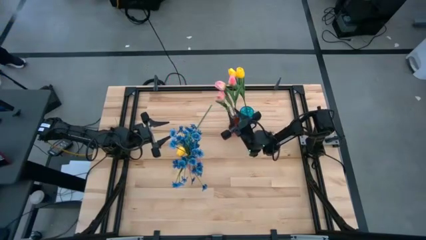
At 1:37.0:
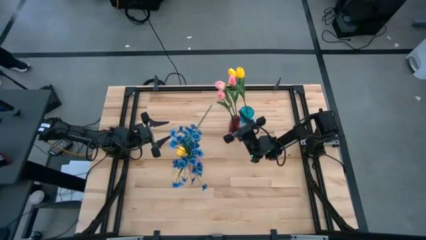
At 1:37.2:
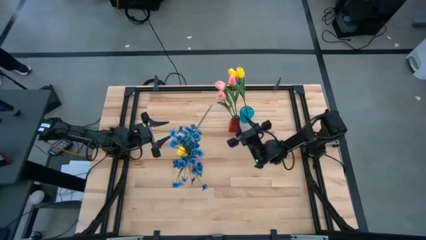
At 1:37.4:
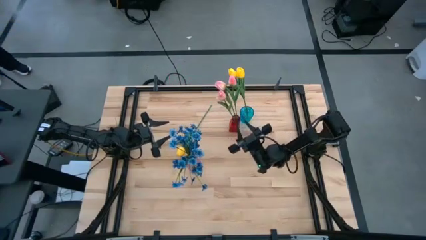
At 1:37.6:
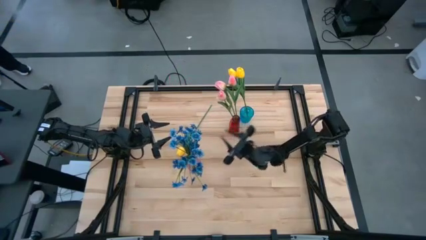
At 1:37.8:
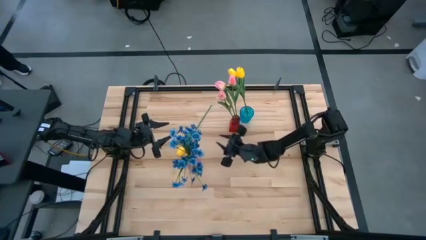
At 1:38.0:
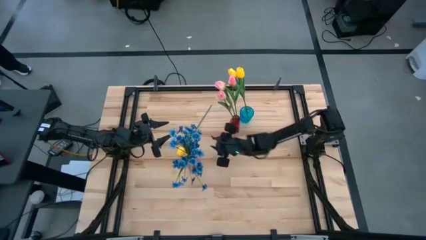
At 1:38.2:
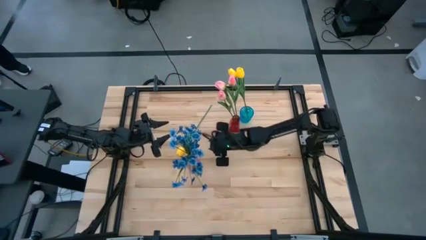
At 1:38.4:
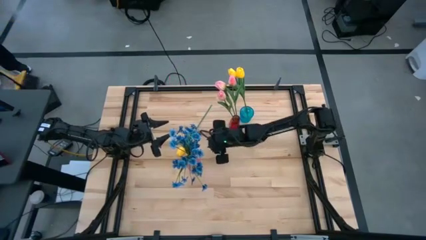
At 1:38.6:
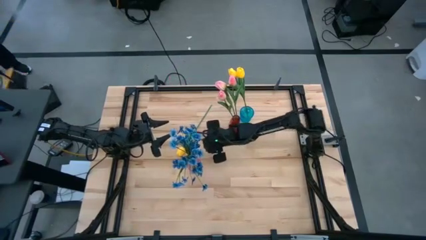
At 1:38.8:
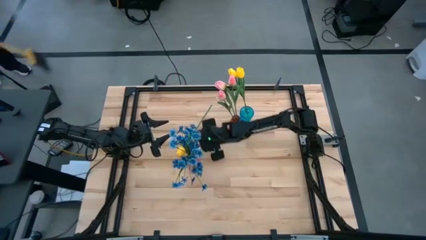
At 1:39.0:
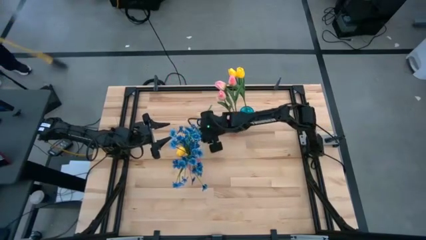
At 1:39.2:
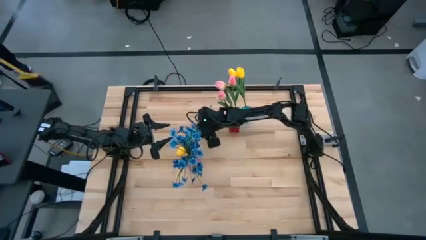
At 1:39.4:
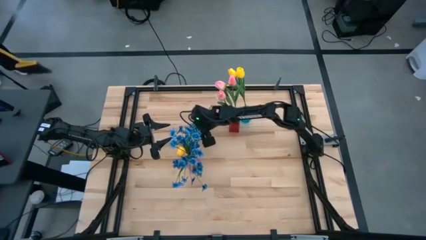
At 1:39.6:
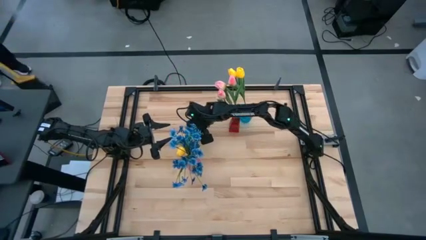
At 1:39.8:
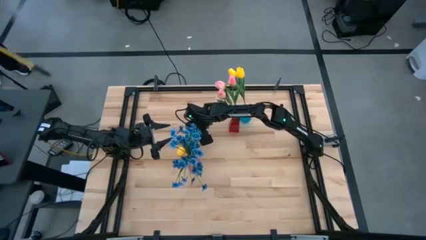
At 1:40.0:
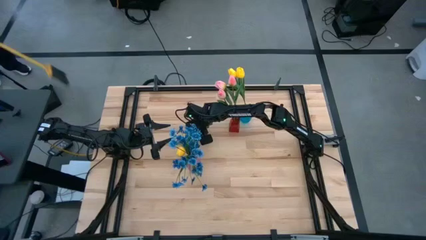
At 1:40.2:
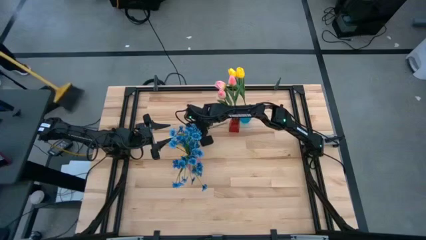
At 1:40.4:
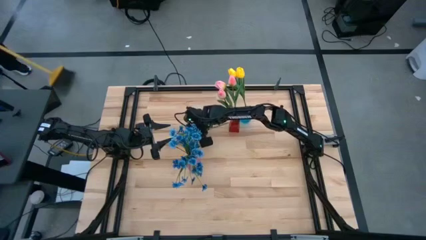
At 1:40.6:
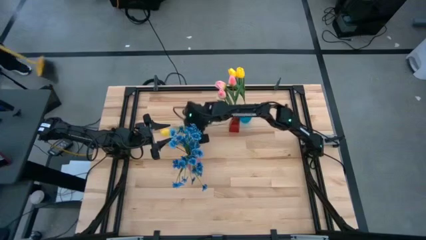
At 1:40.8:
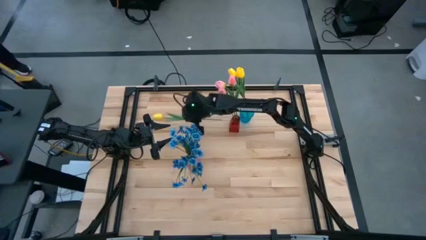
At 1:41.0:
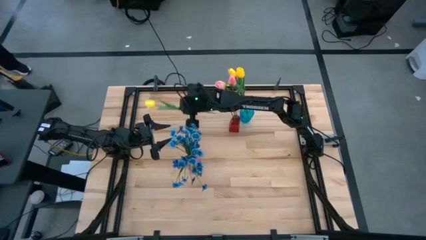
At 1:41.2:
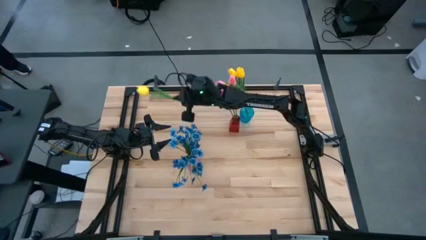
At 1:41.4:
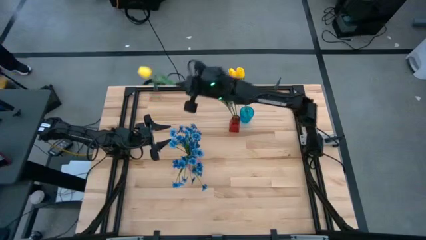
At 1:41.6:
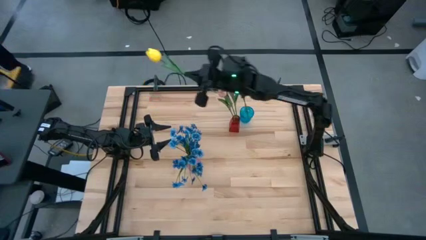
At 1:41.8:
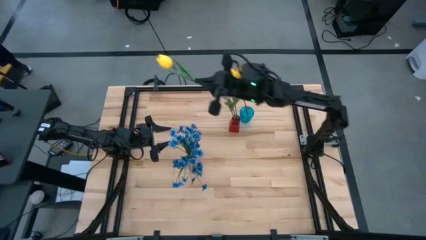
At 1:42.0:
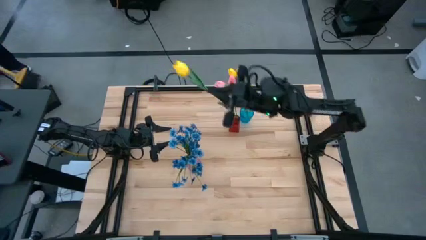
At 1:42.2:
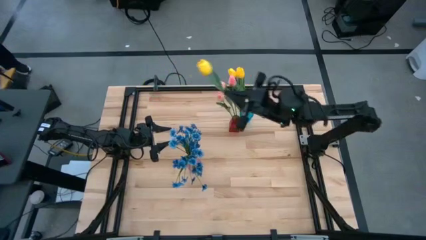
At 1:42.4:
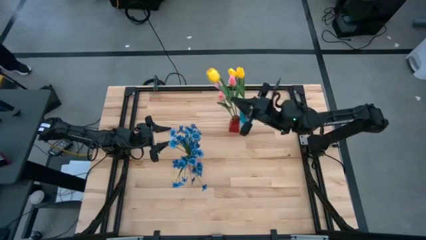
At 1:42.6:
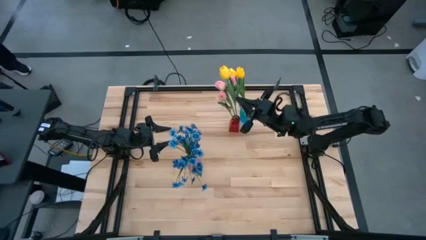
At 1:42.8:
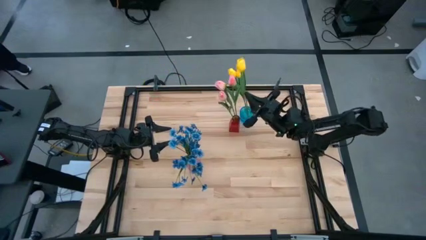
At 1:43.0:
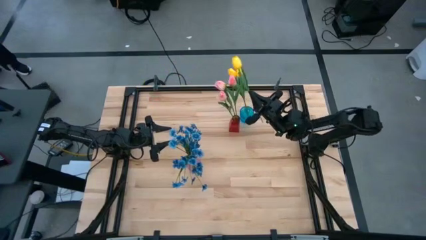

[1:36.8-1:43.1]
Task: Sort flowers into vase by color
Put the yellow flower into the blue vase

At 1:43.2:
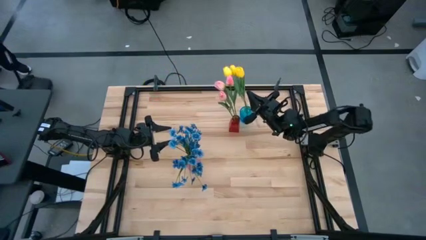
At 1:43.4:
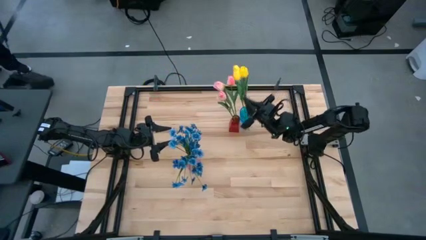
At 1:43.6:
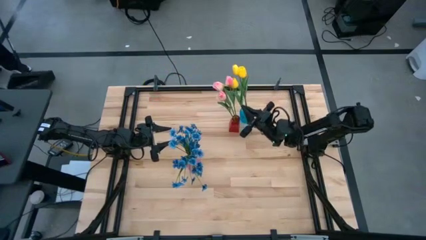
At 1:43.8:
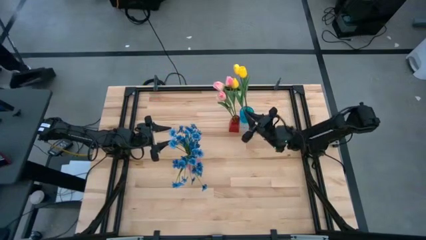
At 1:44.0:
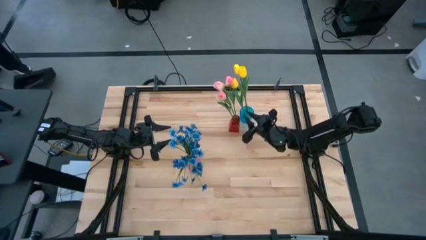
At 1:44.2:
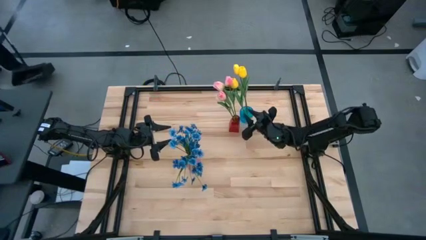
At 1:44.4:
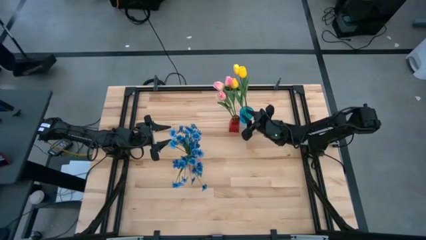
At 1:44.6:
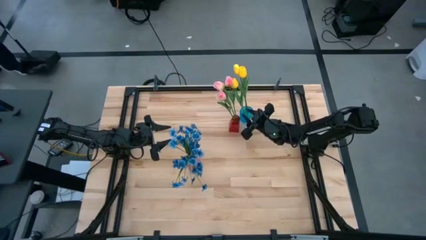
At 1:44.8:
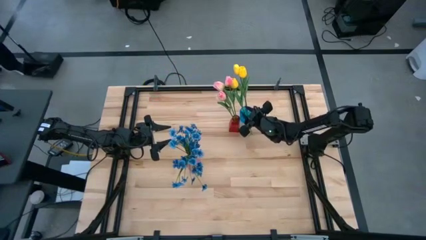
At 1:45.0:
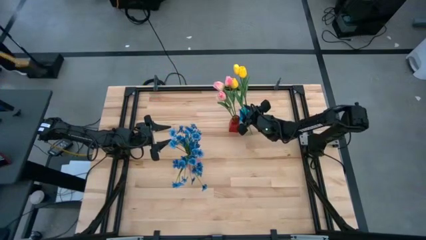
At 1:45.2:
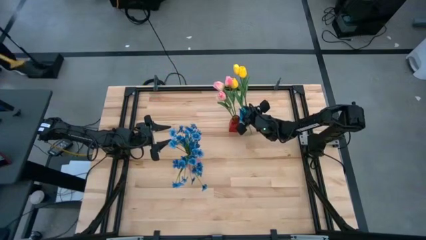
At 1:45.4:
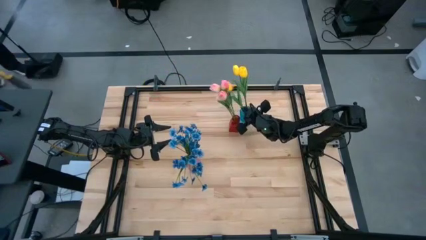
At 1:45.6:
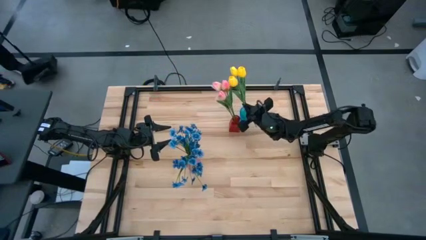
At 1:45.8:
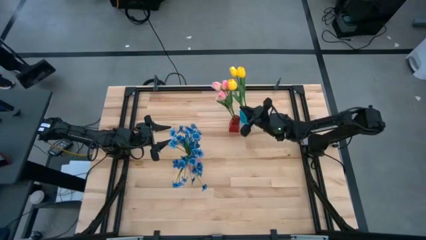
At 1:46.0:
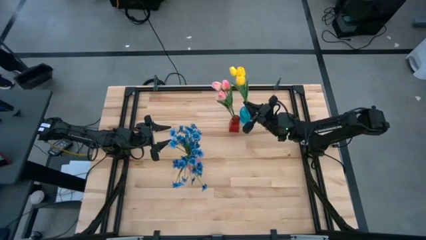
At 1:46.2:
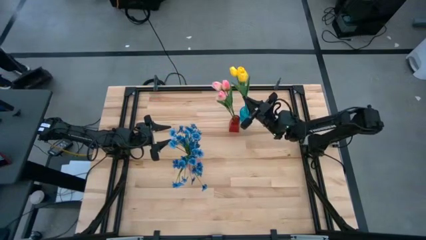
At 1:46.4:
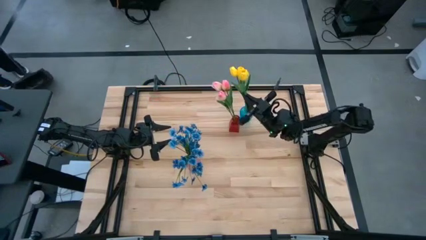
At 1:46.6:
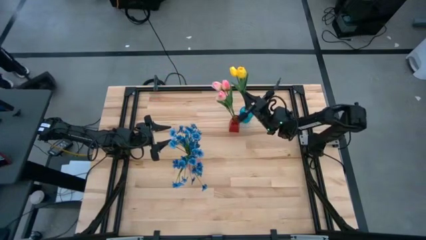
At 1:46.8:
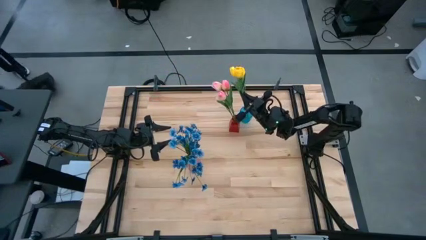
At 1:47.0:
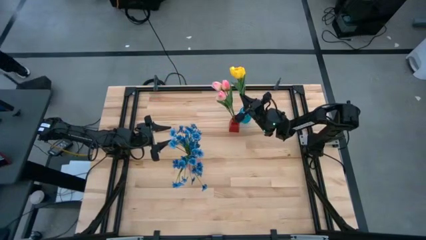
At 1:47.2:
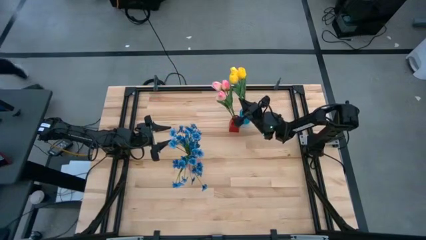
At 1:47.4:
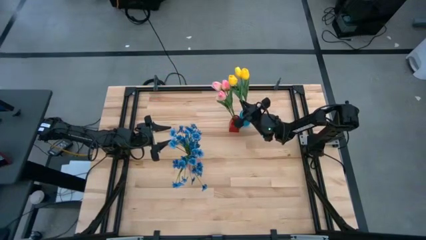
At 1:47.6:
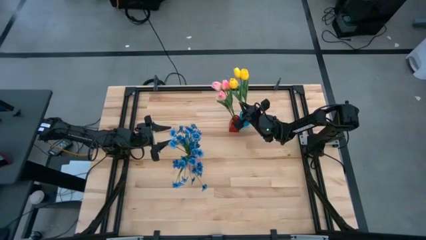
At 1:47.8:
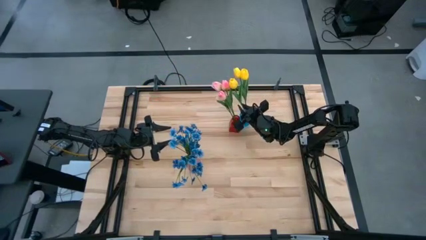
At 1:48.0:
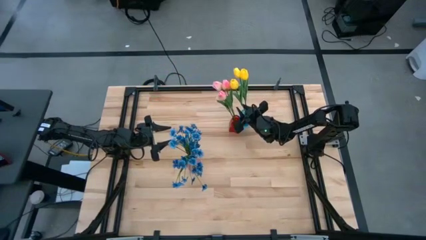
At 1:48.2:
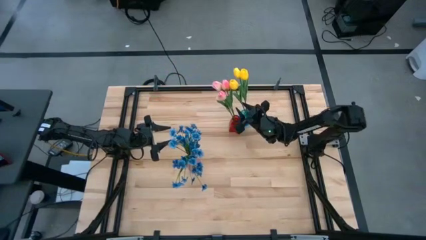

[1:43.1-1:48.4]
Put the yellow flower into the blue vase

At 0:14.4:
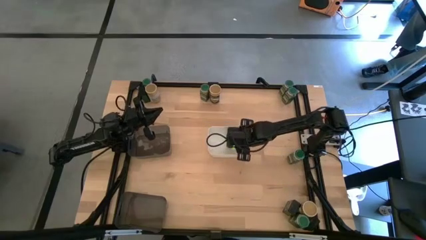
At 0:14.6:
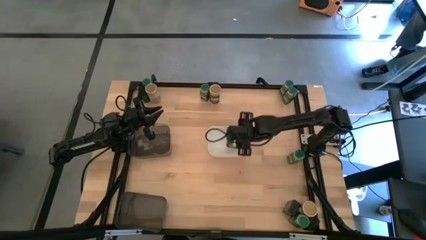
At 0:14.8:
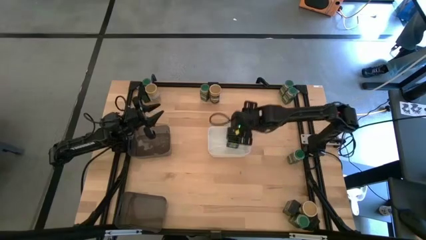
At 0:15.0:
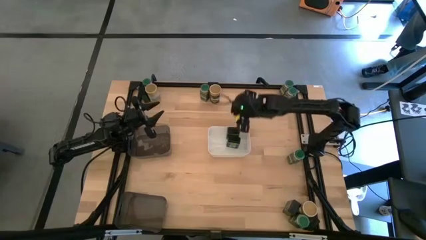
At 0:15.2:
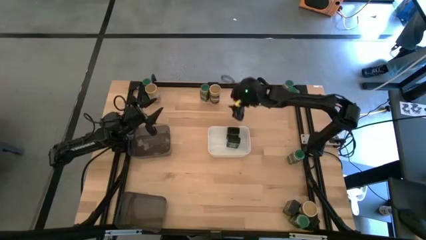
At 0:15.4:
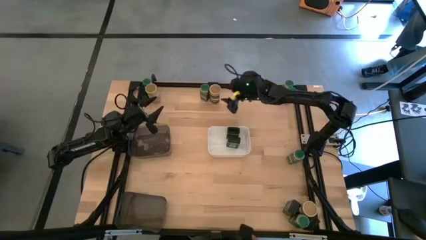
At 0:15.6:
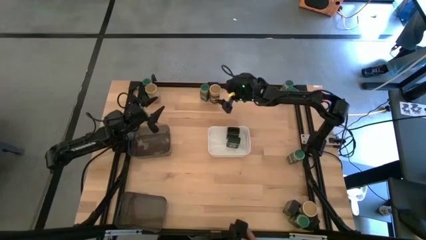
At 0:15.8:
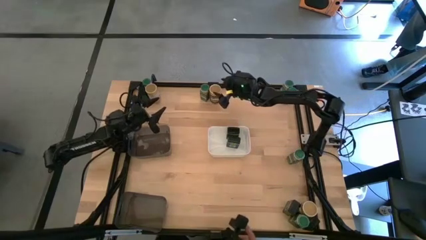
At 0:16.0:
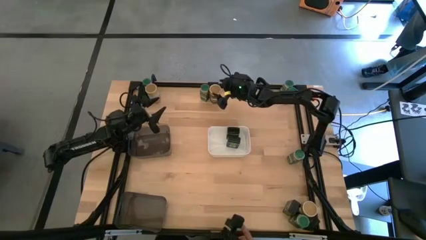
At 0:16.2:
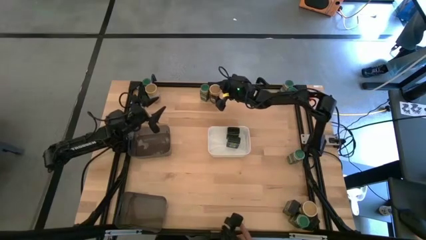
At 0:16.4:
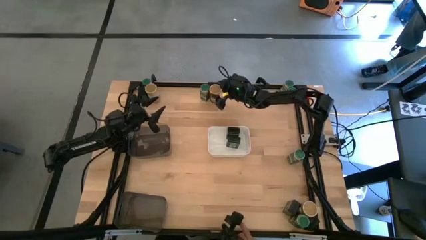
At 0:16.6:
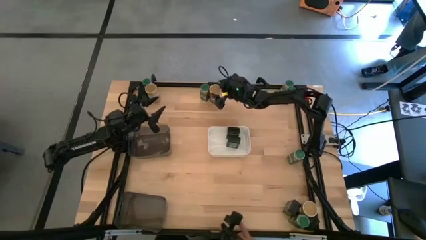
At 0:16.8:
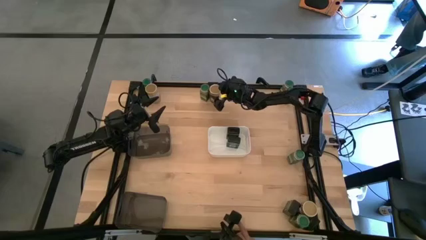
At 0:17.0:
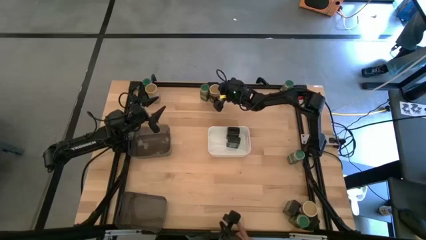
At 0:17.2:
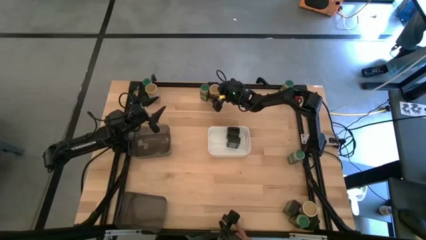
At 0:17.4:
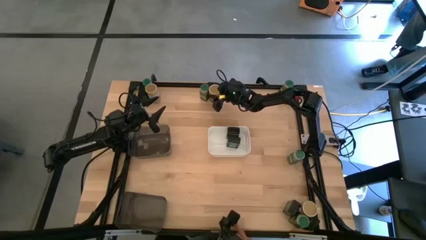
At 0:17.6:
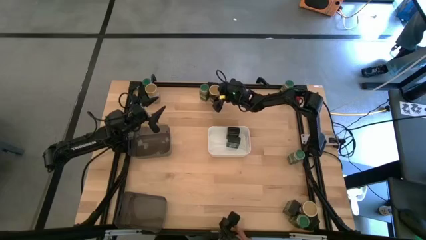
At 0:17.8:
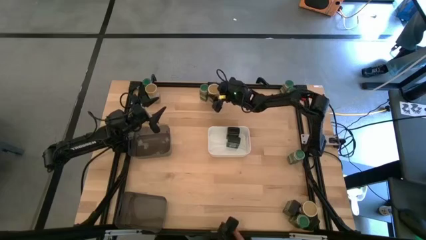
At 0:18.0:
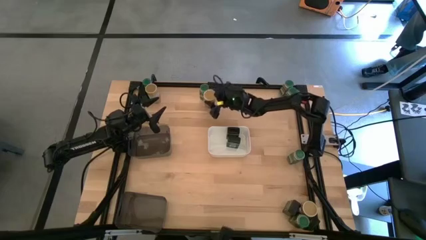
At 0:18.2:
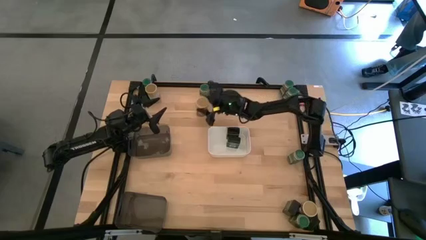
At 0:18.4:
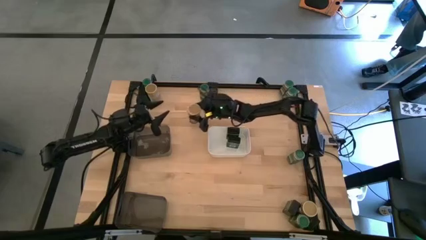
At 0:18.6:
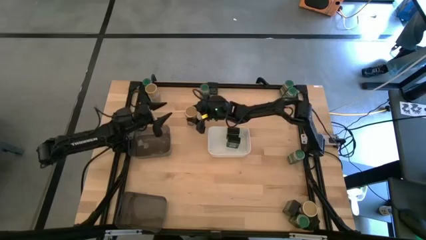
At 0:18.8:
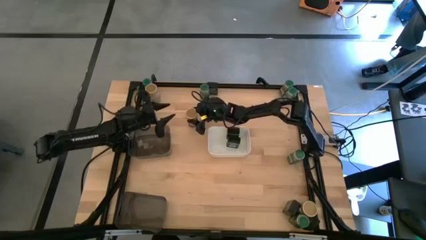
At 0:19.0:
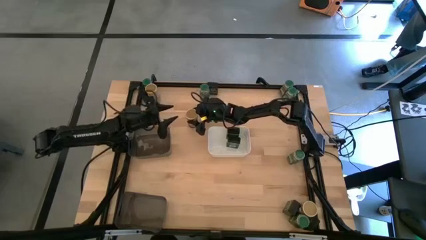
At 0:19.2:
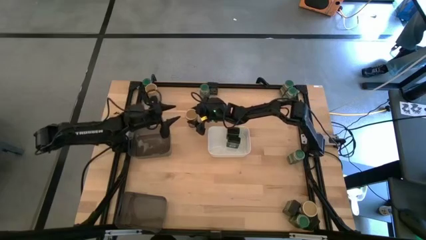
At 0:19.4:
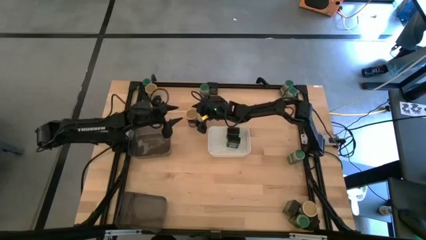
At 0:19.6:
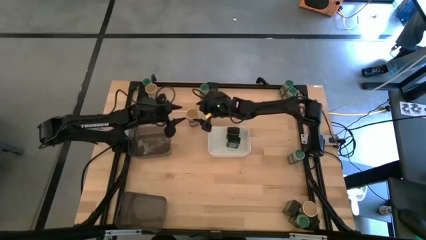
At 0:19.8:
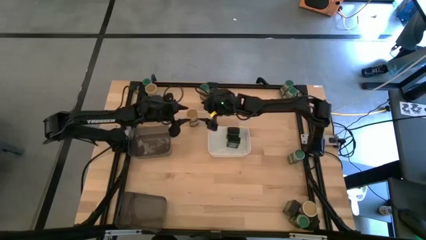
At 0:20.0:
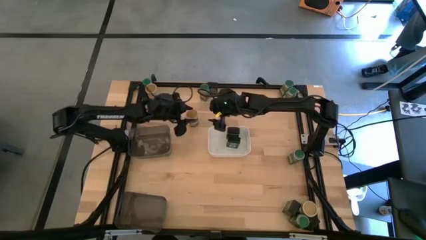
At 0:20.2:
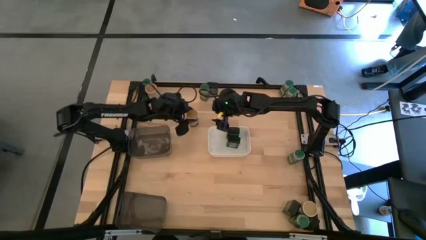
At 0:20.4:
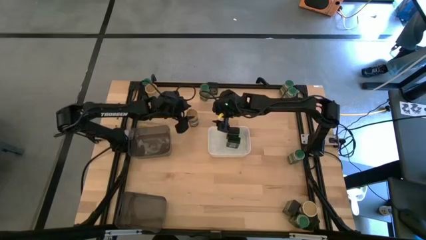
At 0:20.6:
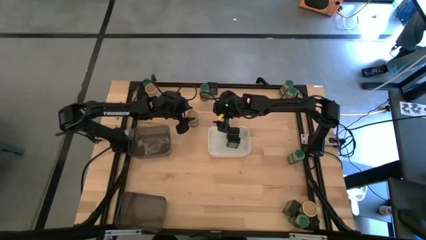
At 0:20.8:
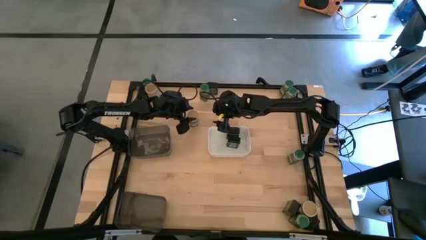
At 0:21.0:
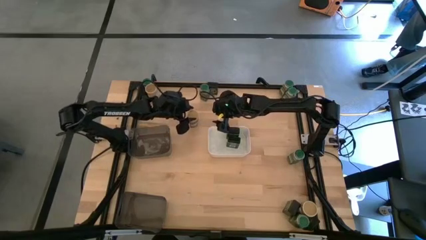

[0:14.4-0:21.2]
Task: Sort spices by type
Put the gold seasoning bottle into the top black bin
